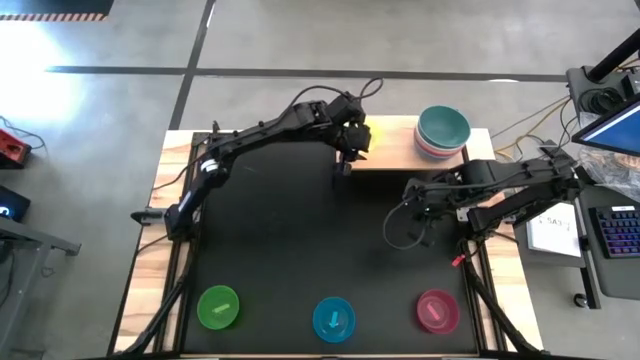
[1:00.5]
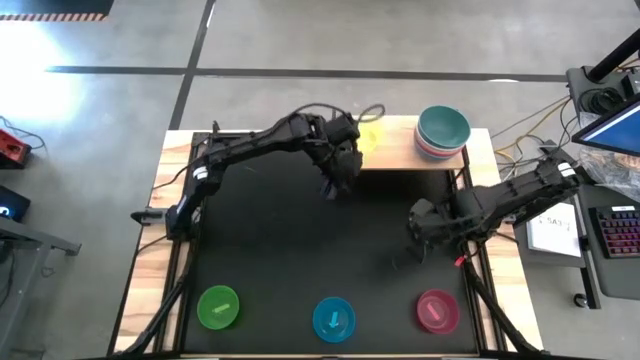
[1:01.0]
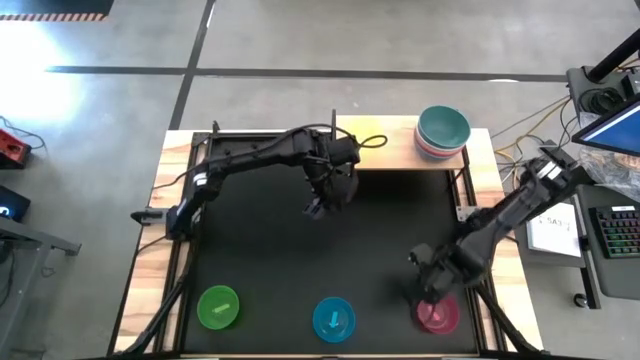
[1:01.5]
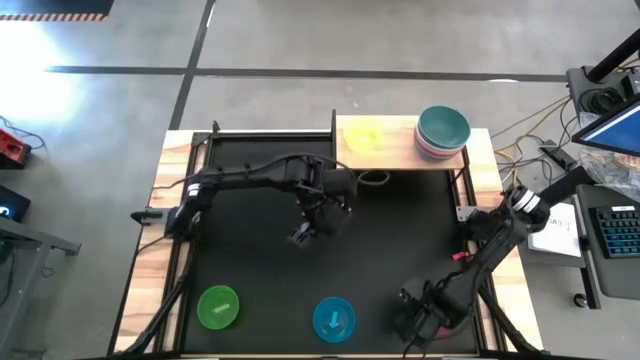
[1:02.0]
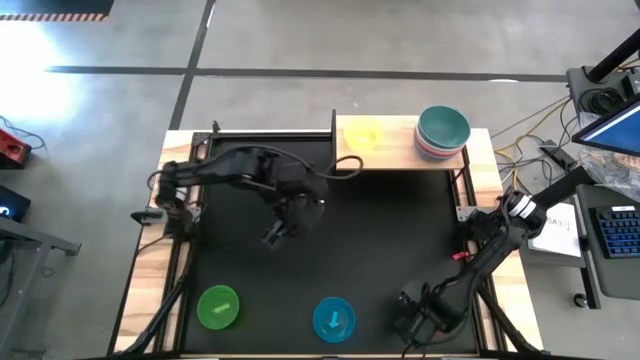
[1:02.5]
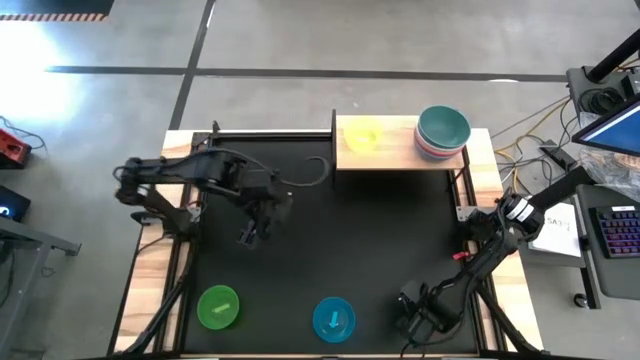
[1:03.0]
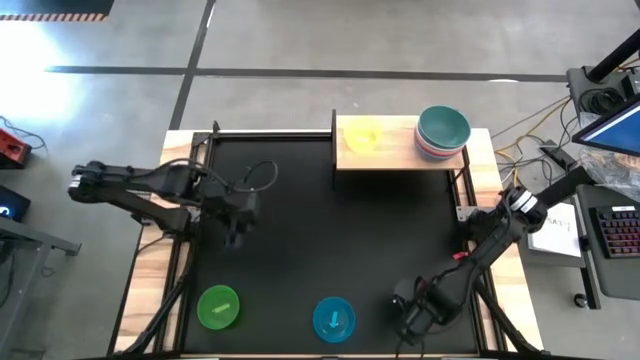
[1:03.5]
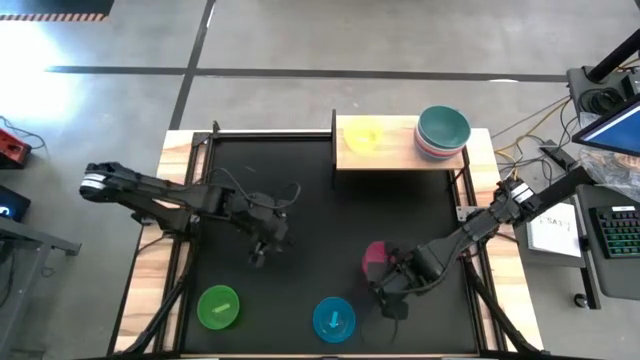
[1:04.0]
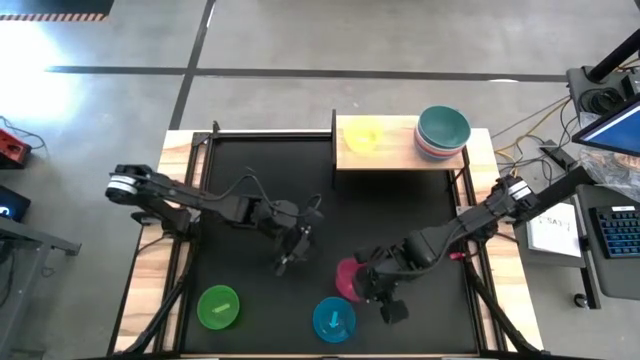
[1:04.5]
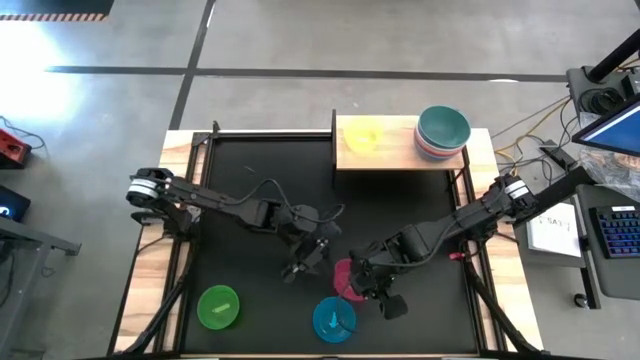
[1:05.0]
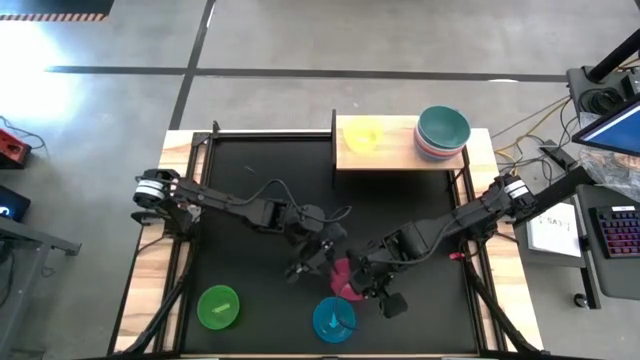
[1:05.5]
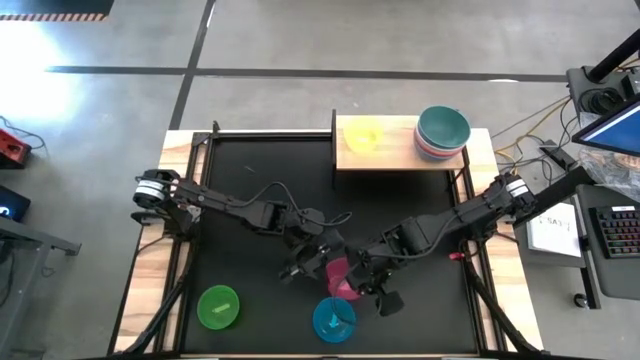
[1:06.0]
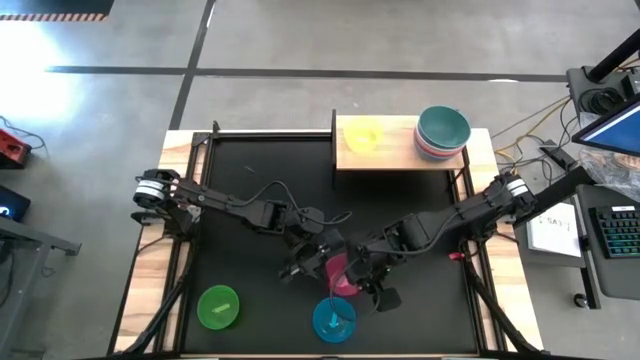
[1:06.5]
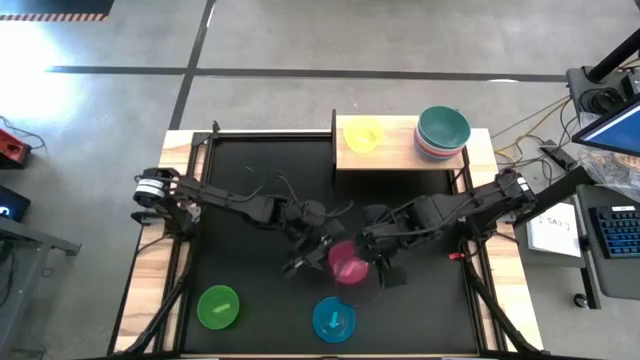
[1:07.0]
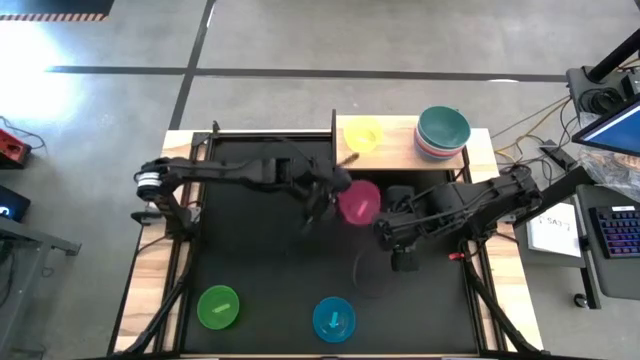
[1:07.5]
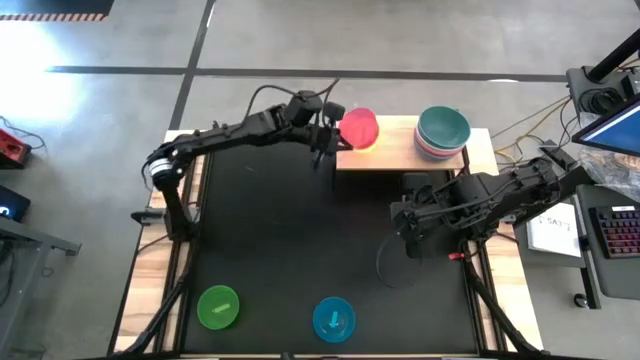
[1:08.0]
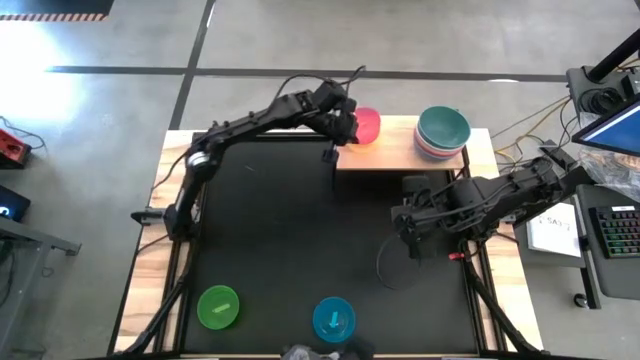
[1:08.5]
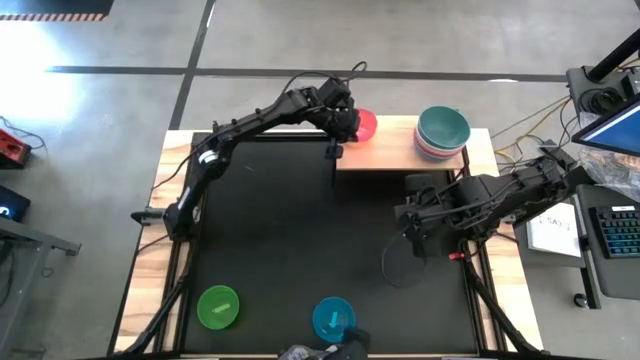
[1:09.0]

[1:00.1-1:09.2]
Task: Place and stack bowls onto a shelf
Stack the red bowl on top of the yellow bowl on the shelf

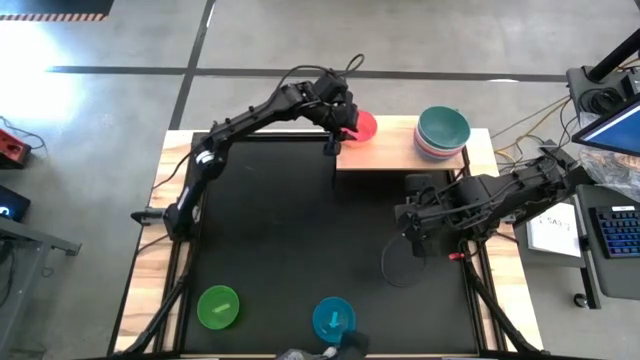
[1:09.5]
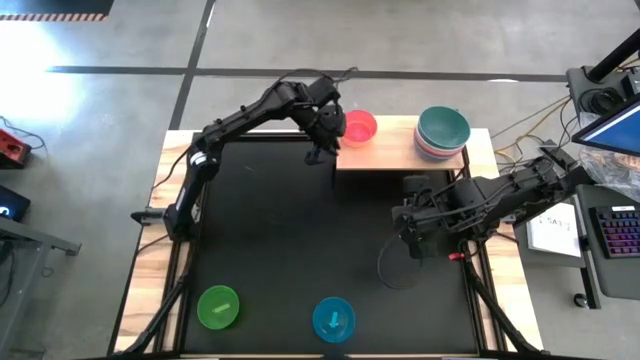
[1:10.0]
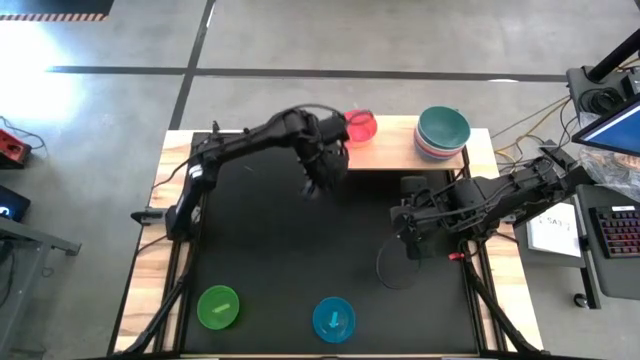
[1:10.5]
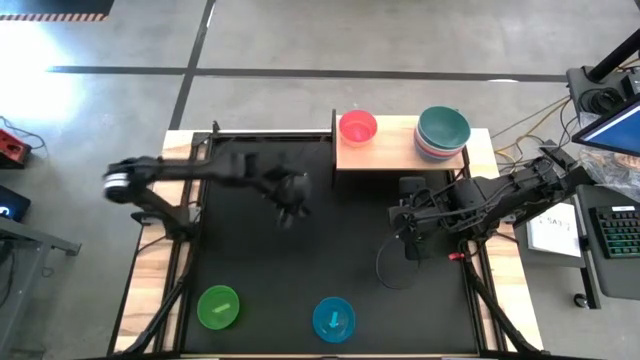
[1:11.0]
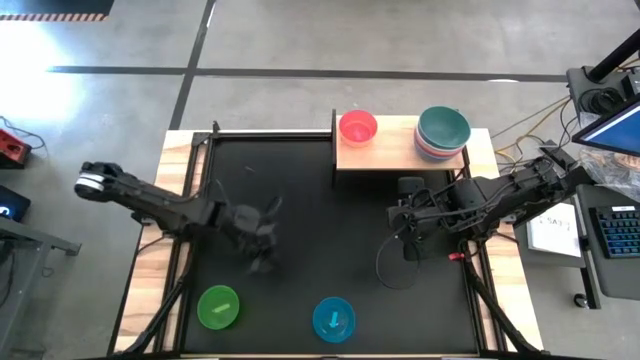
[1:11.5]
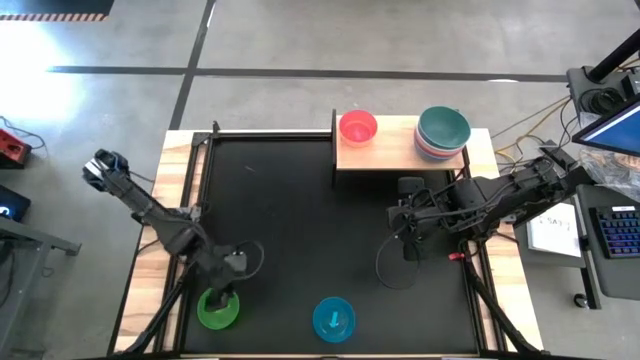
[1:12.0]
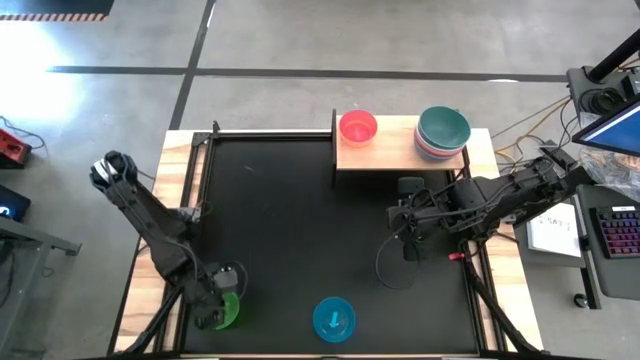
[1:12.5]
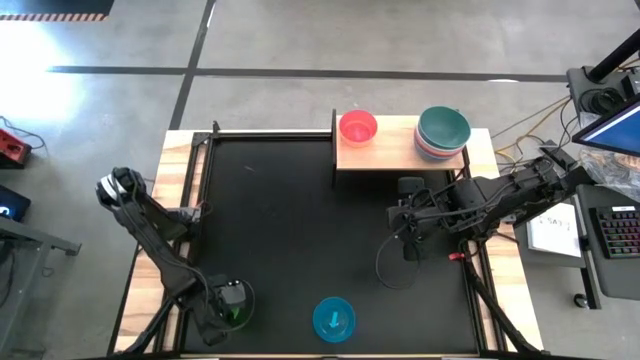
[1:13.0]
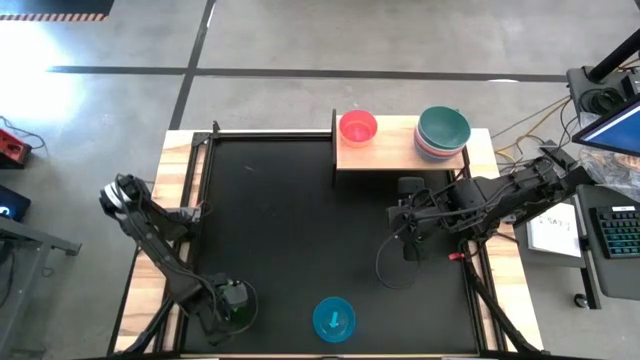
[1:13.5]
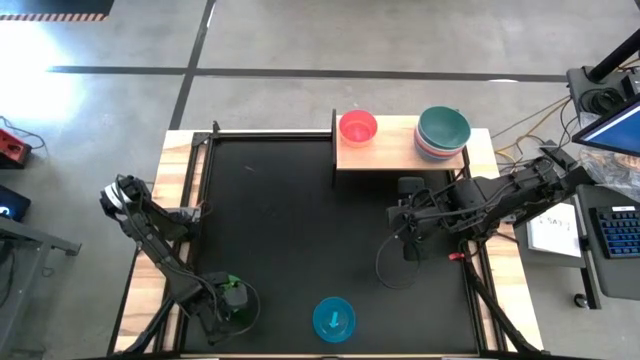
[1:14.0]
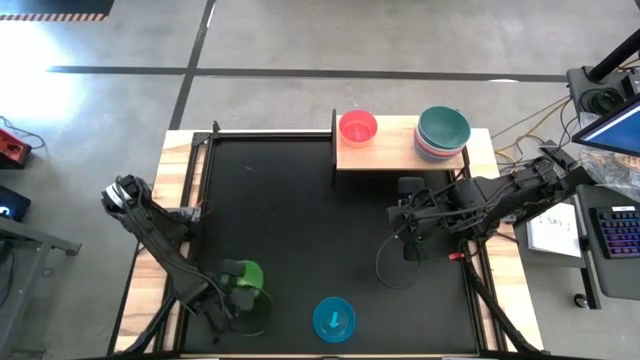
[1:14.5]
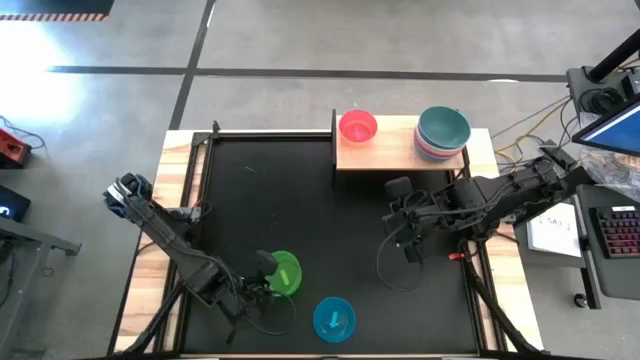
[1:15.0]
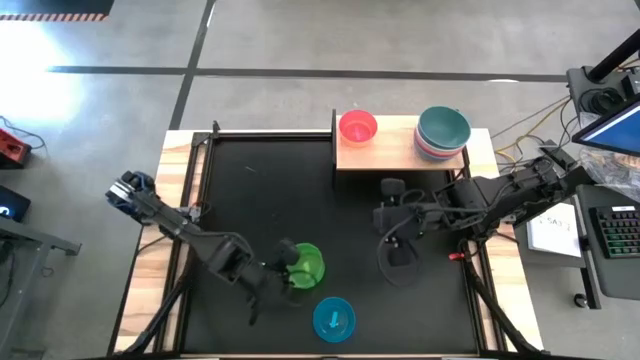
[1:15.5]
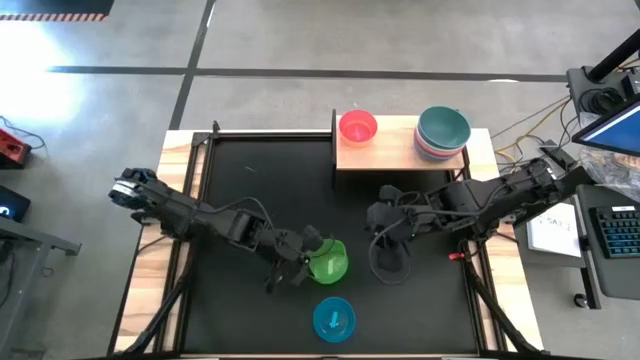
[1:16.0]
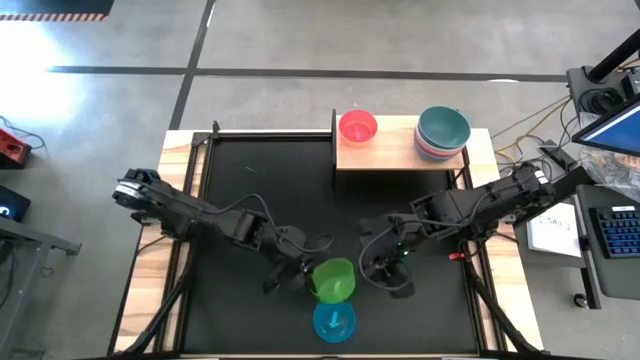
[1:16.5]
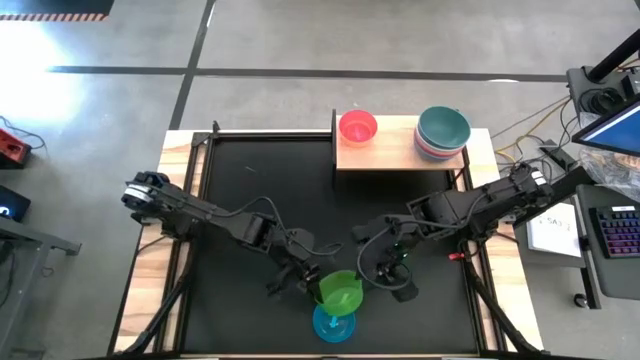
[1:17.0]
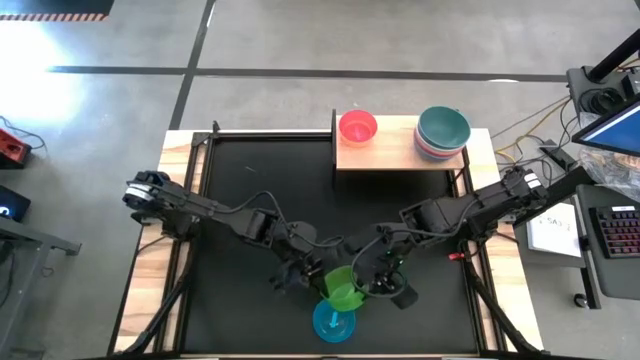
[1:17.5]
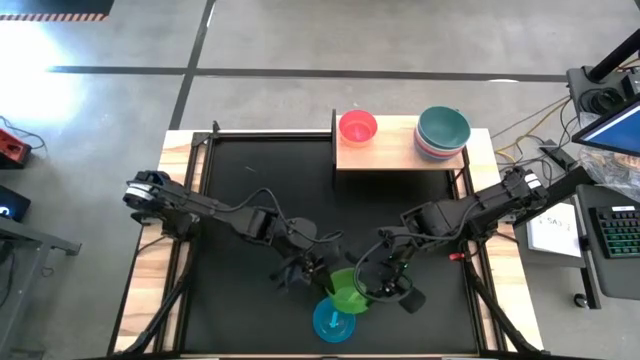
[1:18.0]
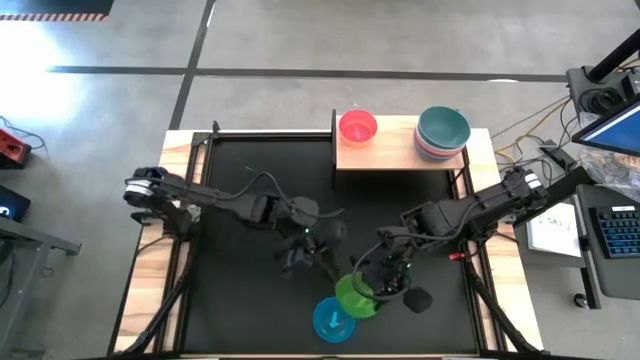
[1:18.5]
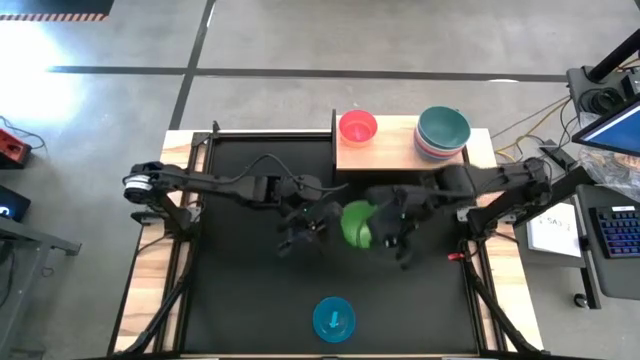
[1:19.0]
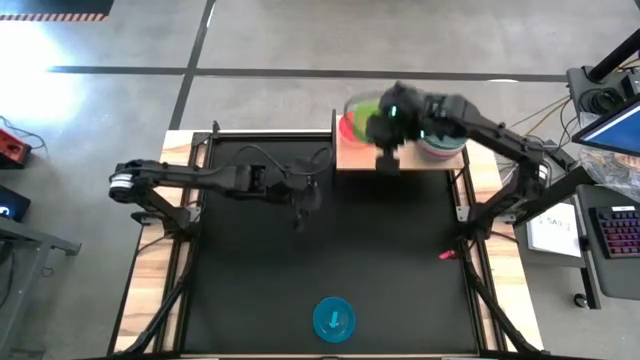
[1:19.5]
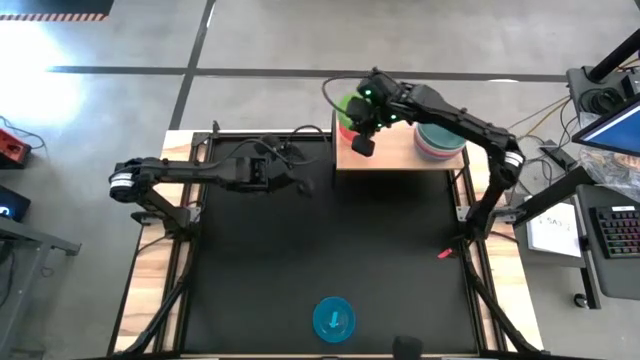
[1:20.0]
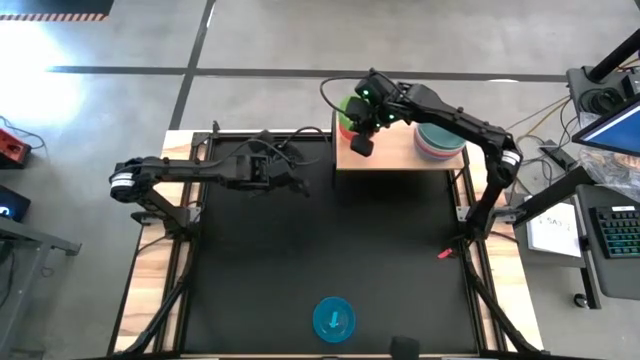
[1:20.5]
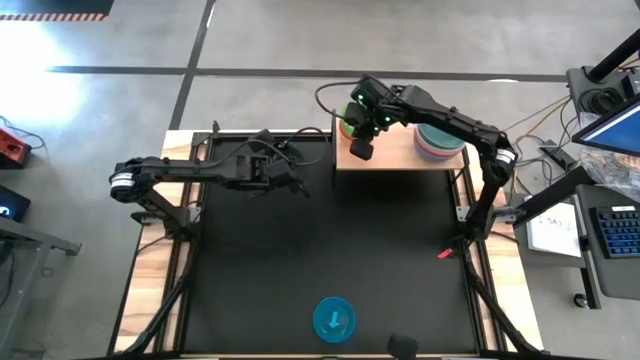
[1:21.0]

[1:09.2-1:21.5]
Stack the green bowl on top of the red stacked bowls on the shelf
